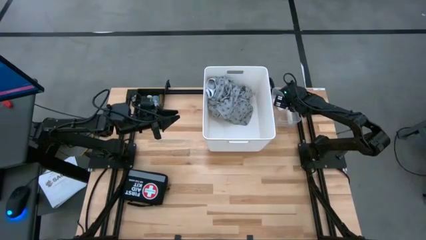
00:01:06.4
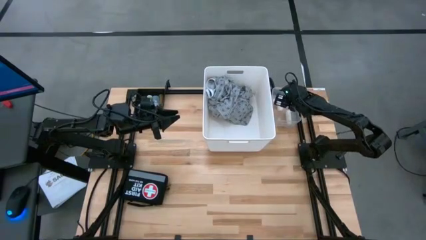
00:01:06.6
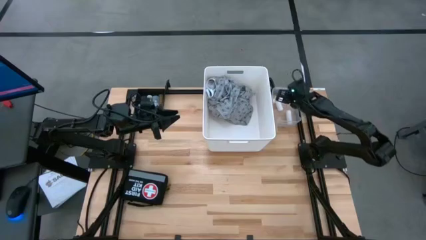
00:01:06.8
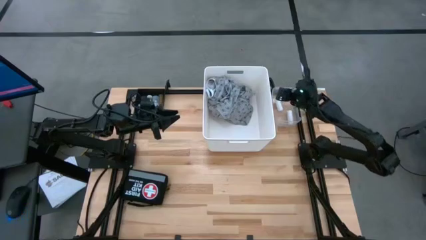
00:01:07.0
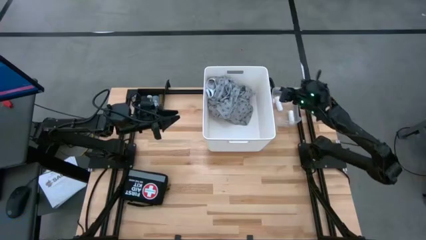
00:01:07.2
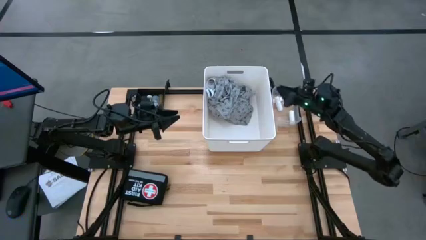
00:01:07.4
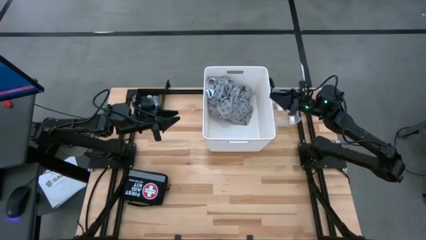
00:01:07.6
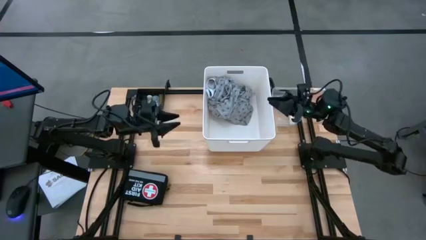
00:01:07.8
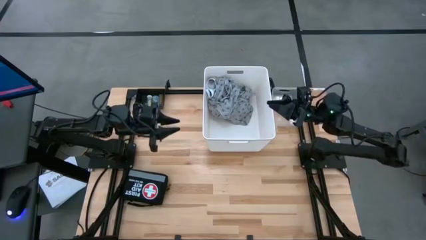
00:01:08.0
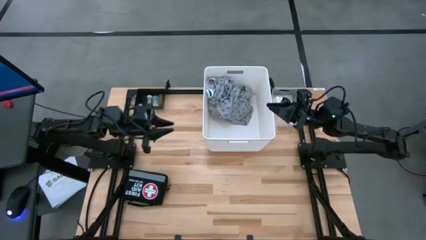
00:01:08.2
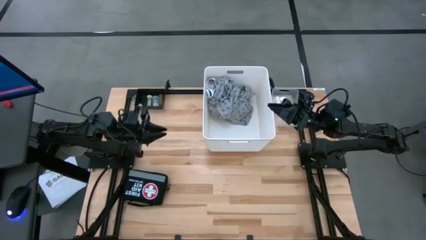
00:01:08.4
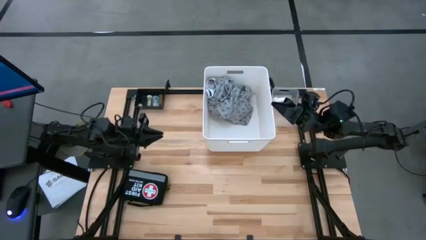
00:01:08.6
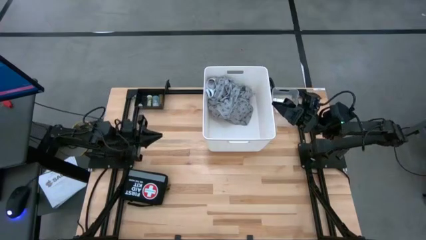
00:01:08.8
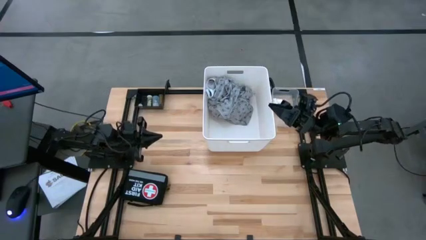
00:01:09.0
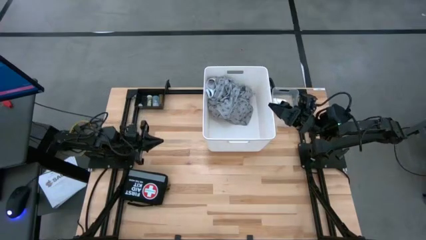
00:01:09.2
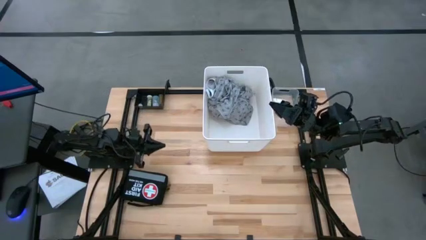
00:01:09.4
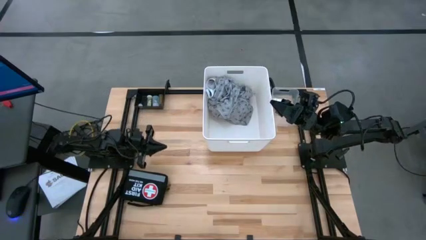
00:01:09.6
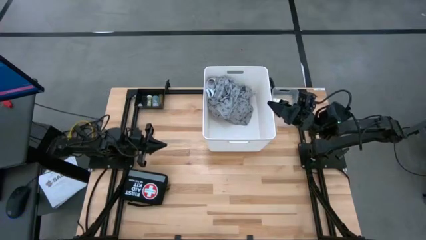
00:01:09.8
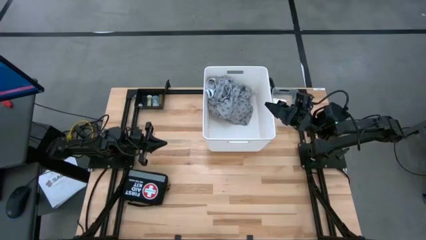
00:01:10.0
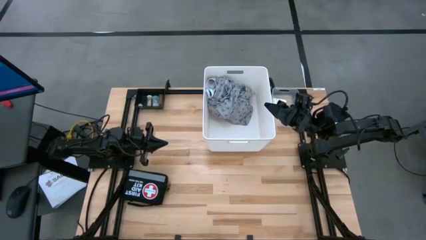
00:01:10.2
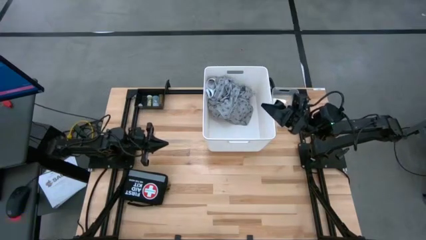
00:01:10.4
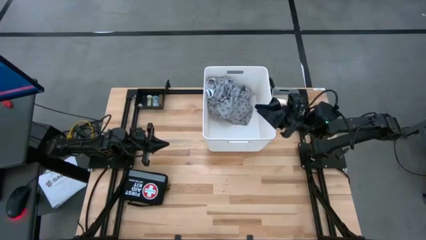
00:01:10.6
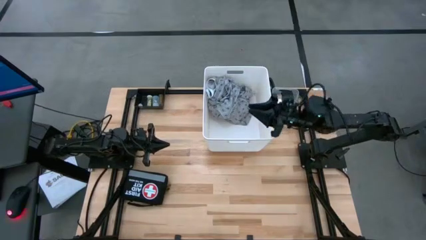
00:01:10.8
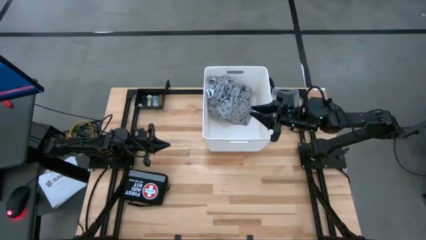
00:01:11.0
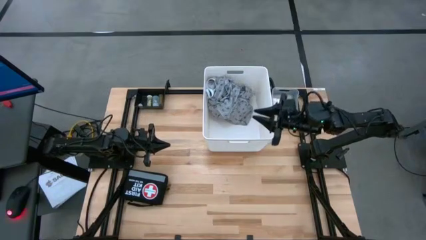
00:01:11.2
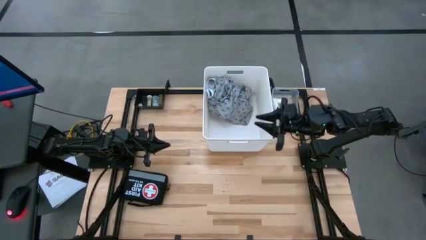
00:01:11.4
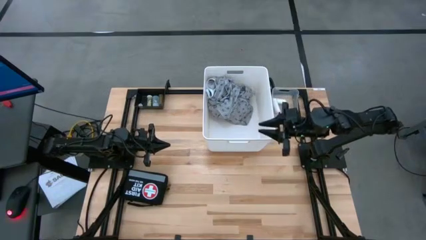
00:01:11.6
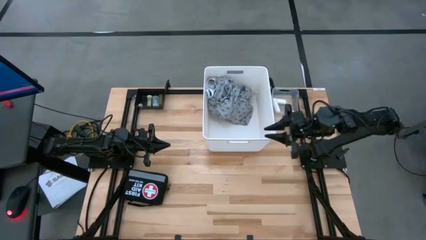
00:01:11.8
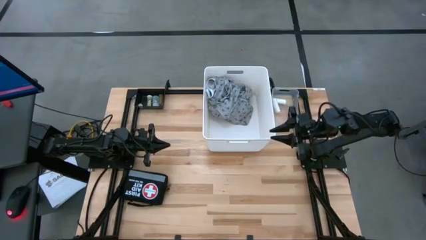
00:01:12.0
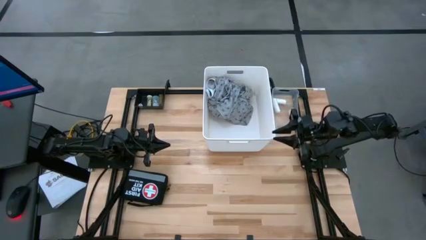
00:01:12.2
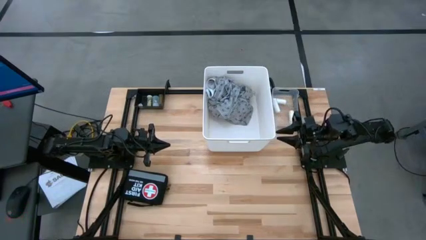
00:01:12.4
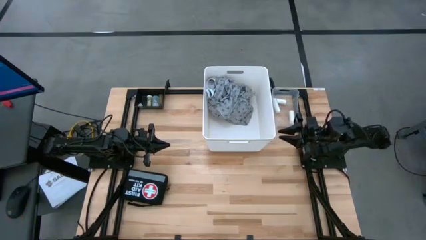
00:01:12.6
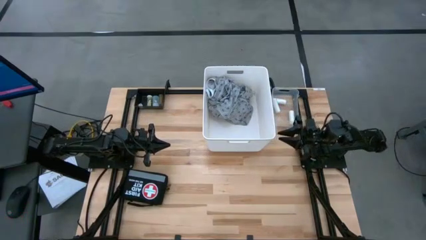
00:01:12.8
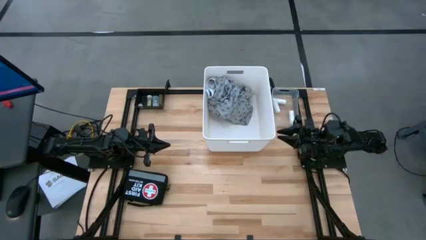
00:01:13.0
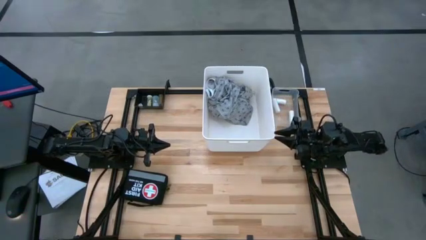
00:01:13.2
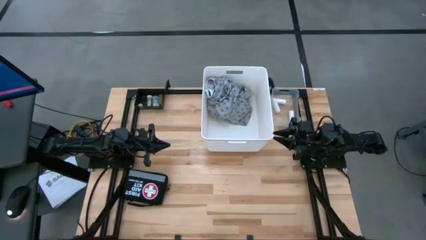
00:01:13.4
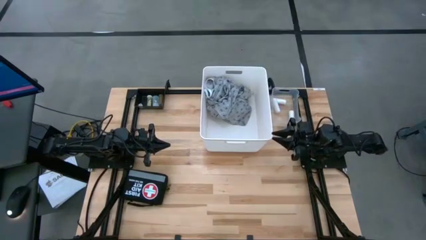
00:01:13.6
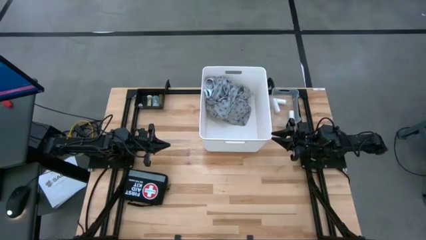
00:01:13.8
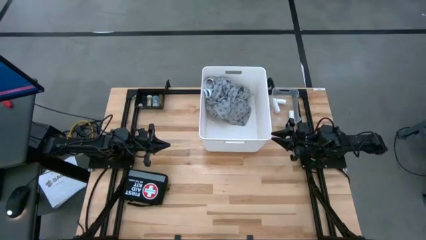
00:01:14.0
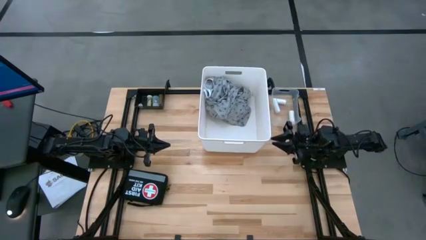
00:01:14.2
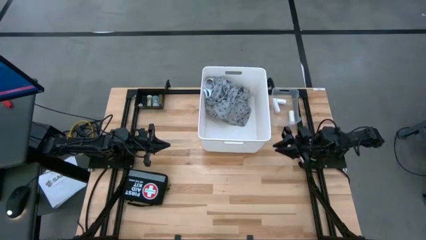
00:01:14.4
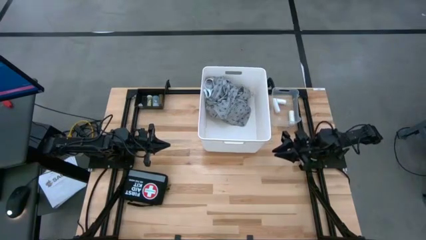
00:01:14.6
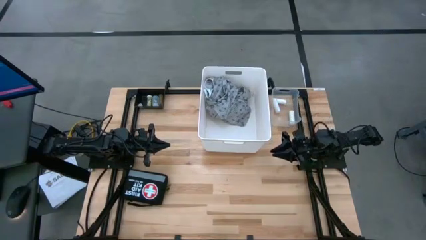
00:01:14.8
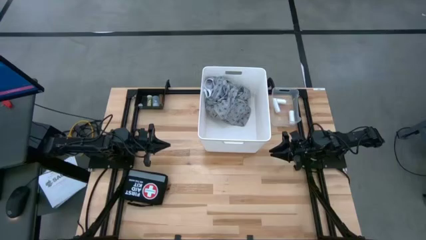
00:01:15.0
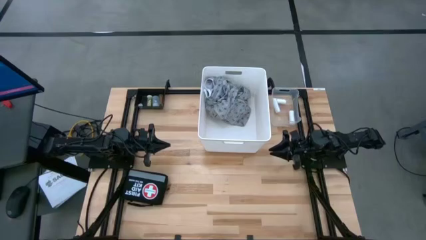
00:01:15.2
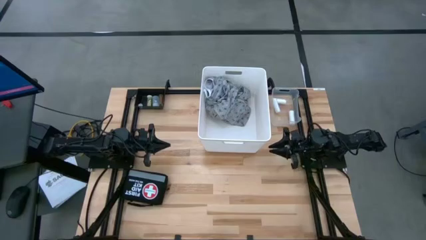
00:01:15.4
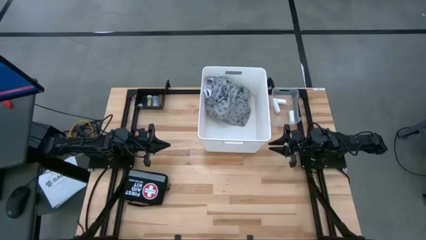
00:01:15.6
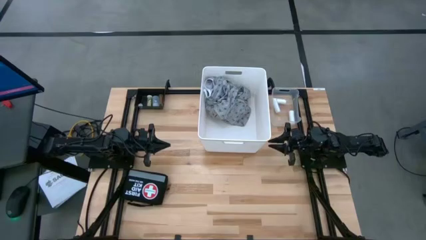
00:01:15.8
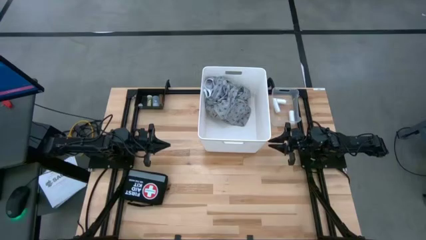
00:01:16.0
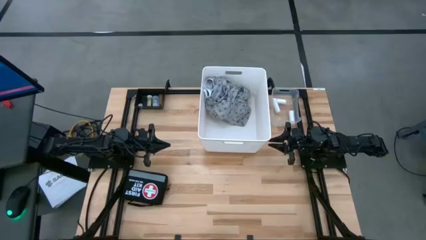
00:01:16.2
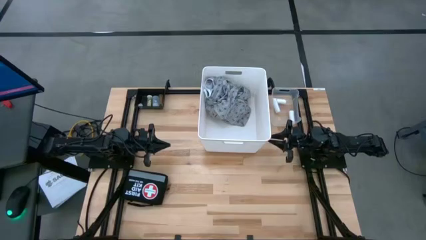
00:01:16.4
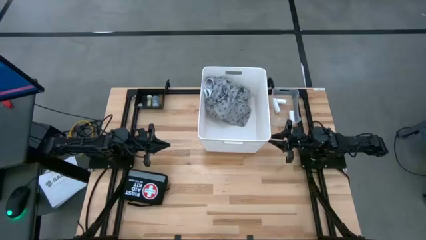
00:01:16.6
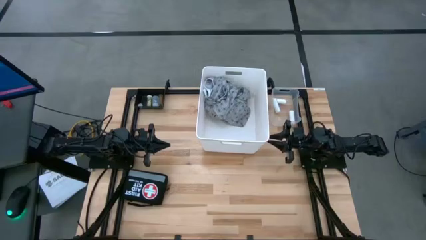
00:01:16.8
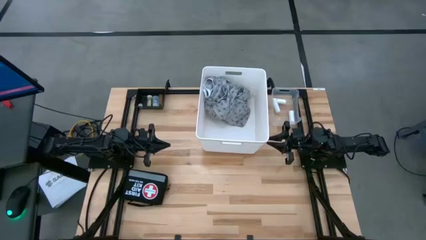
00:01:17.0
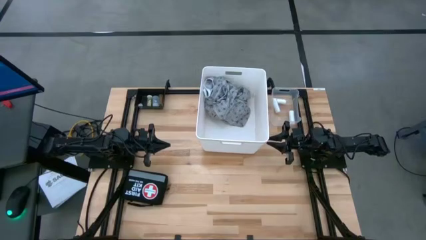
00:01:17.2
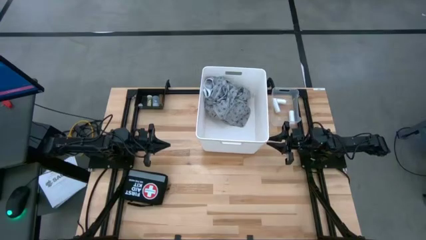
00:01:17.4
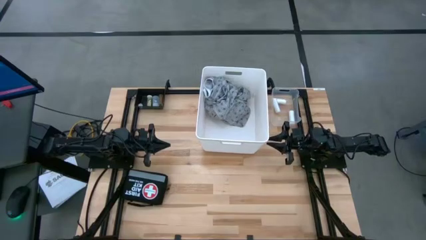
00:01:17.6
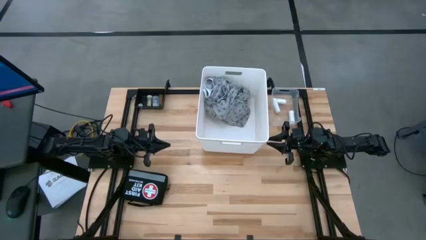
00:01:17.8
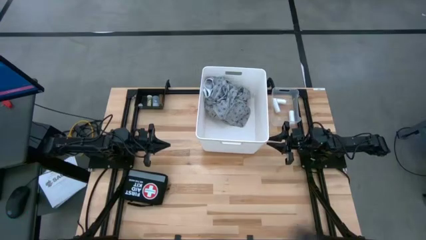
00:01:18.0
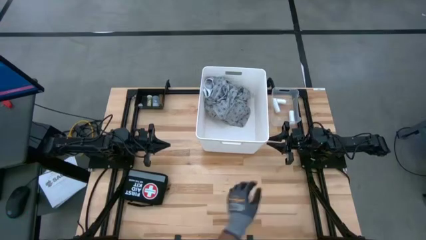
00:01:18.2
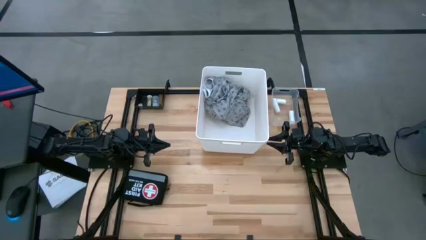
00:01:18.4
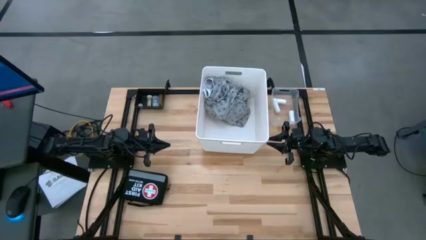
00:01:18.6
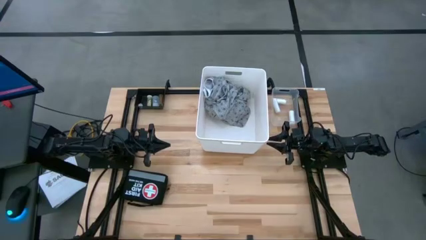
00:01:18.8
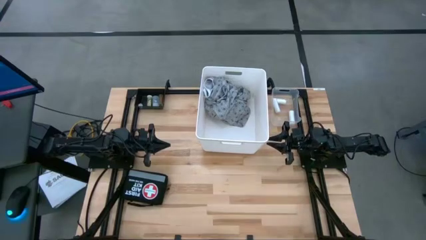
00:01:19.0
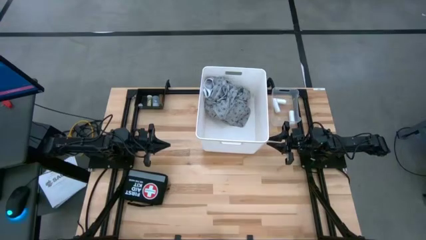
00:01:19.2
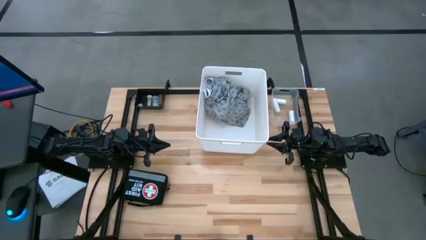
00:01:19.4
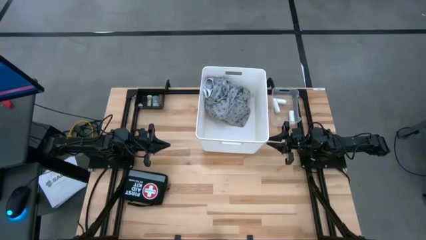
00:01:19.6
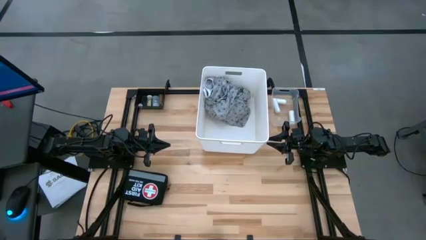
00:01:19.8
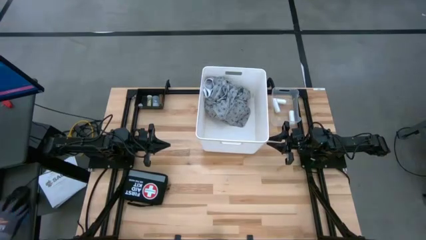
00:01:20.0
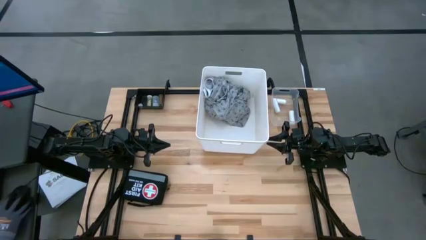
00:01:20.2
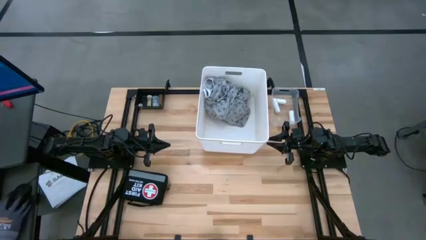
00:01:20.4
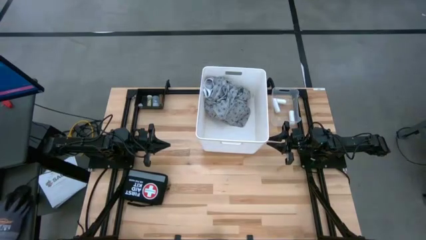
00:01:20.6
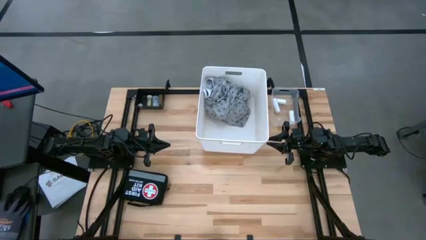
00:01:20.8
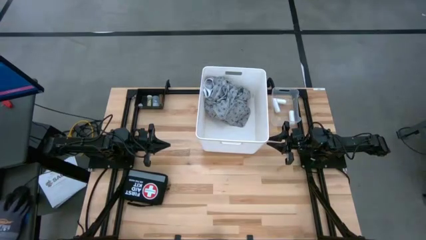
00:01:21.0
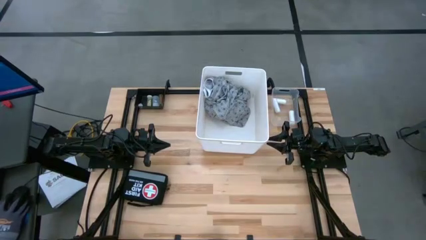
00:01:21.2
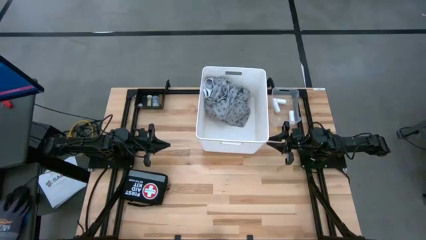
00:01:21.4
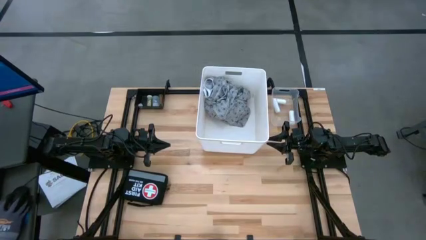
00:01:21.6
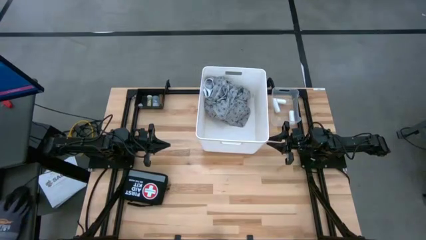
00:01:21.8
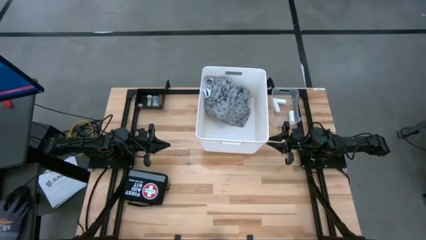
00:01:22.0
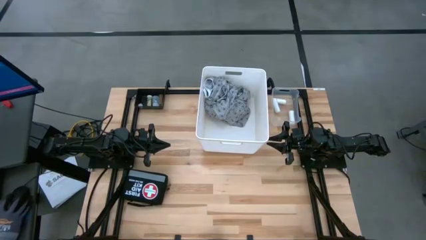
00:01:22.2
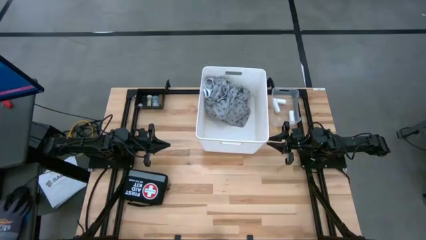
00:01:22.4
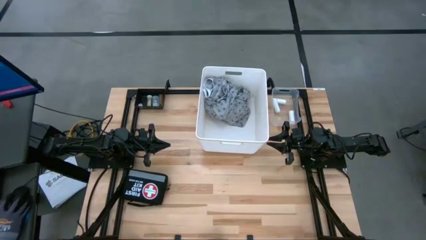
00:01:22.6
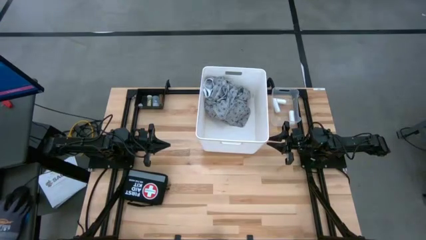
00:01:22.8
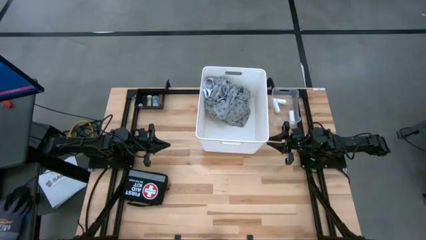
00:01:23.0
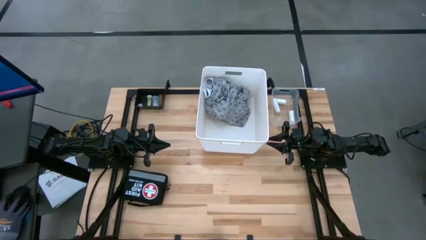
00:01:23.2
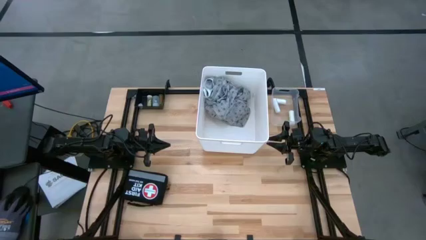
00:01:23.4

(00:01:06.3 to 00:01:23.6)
Task: Pick & place medical supplies in basket/bin
Return to Home Position
